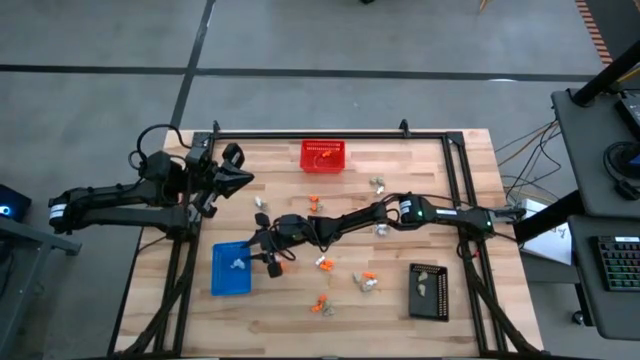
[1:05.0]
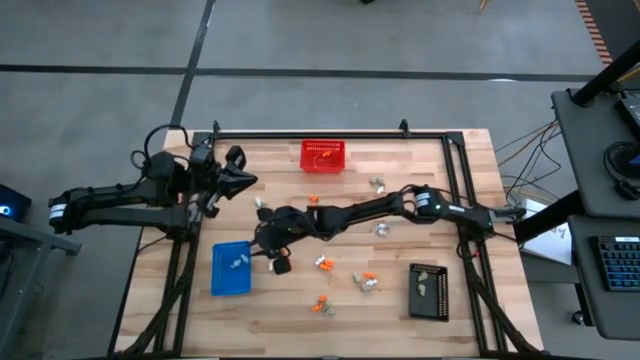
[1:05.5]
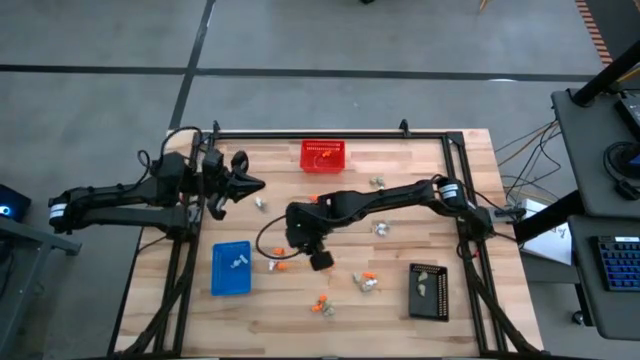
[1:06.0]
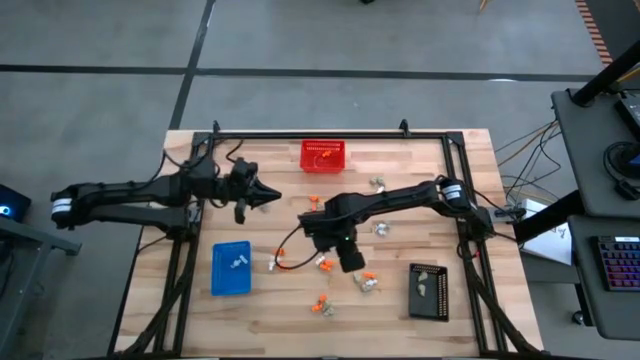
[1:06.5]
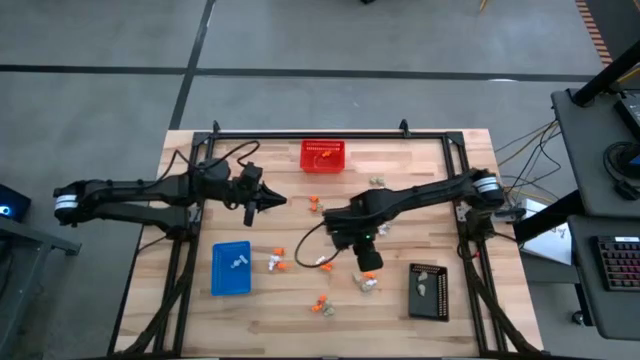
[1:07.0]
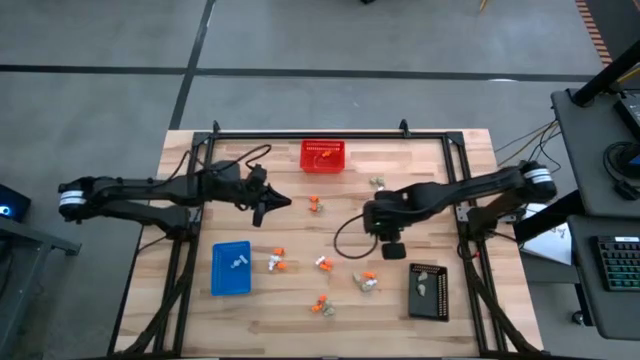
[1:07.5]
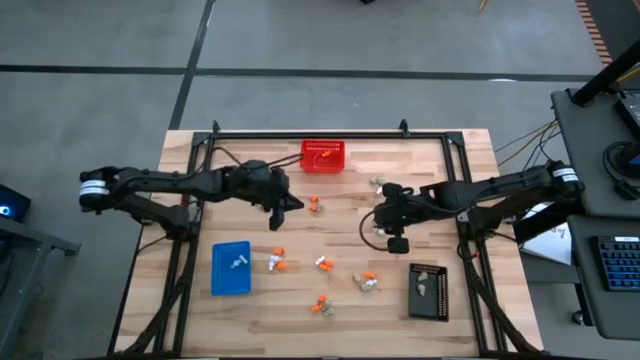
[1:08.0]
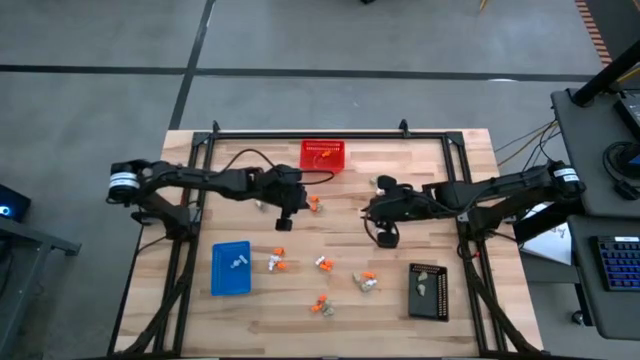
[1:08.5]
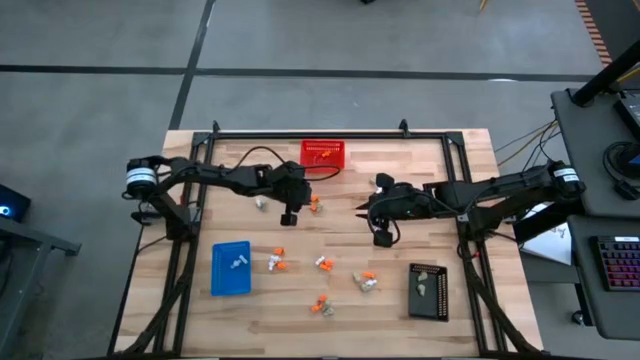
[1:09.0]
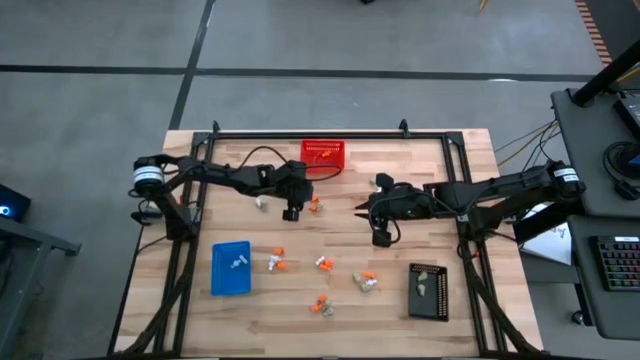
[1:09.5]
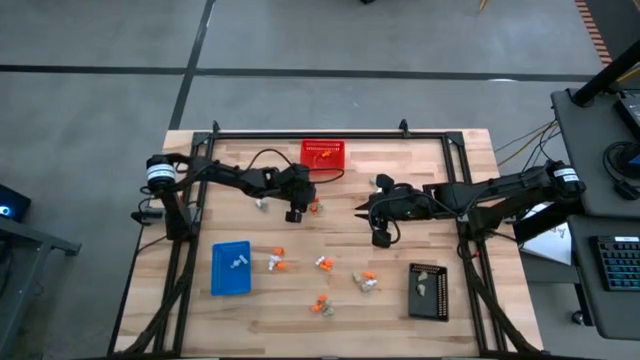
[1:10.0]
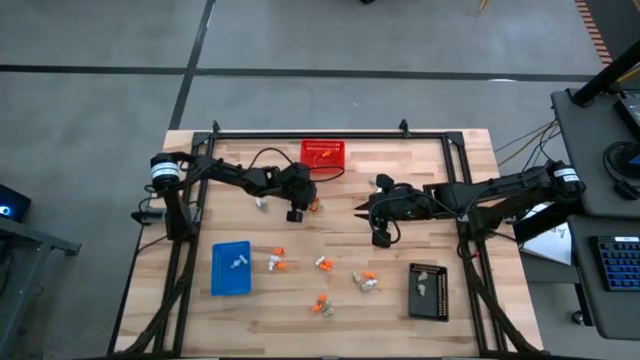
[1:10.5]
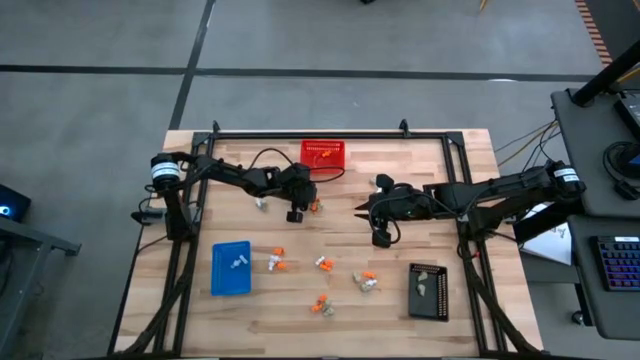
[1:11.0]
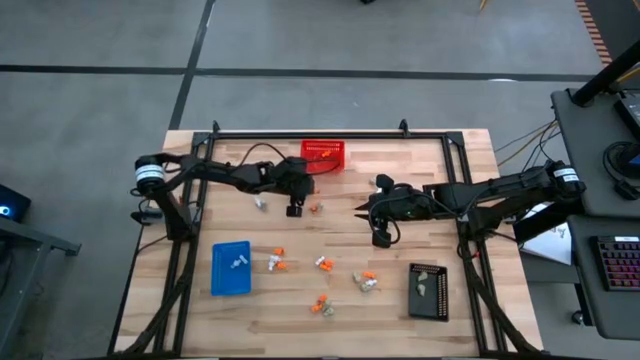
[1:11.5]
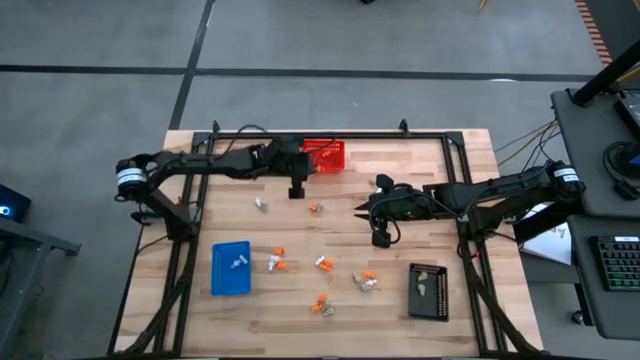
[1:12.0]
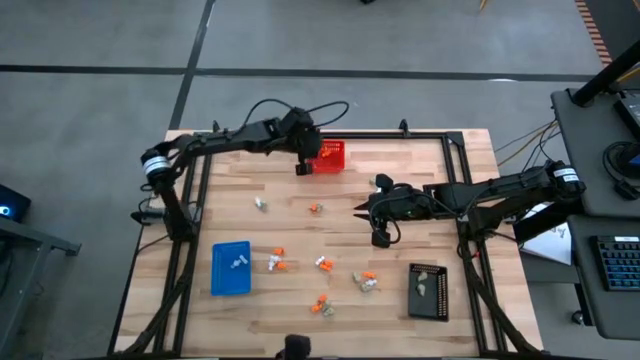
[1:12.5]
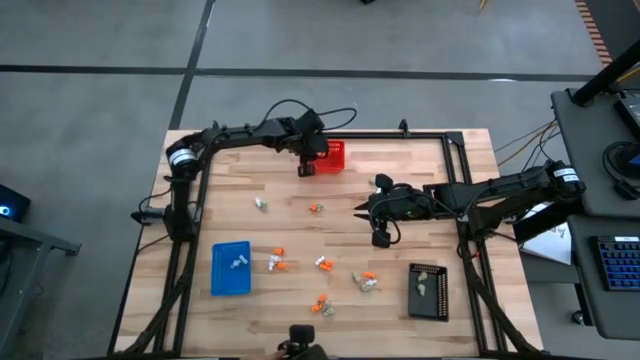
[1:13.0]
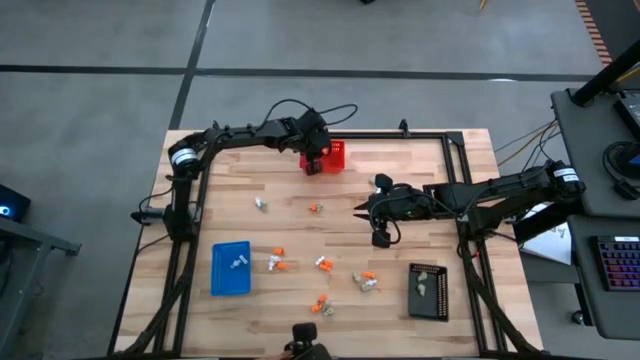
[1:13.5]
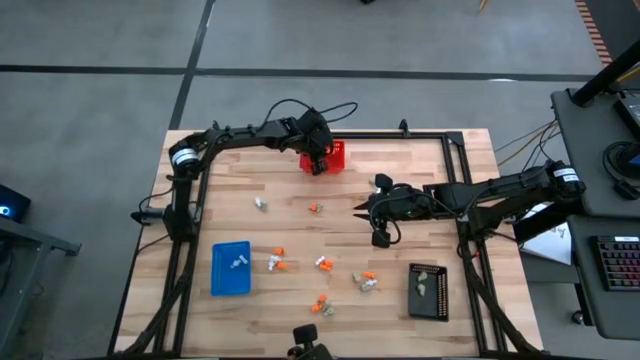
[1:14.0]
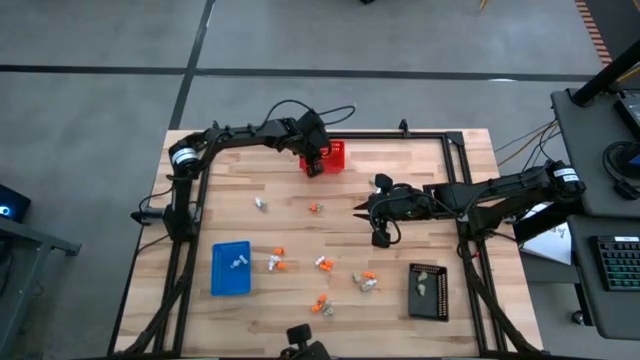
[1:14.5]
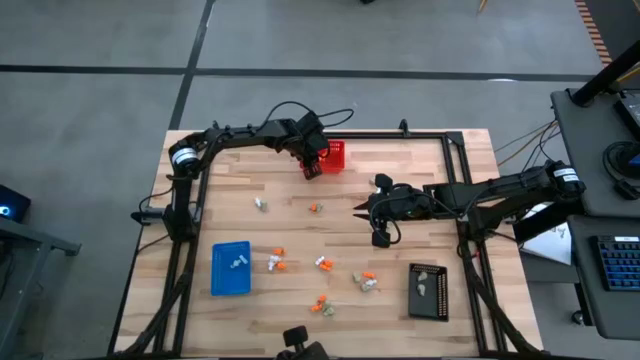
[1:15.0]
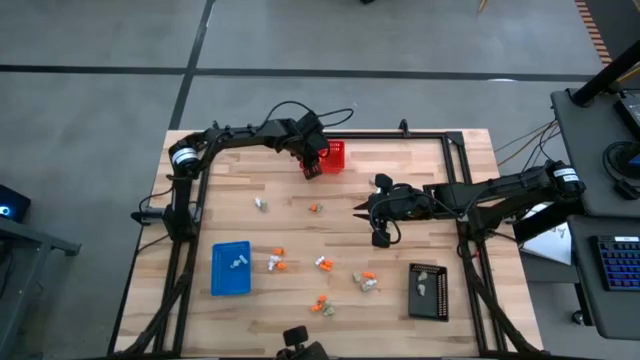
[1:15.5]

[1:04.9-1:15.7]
Task: Sort Halloween decoration
Put the orange skeleton toy into the red bin

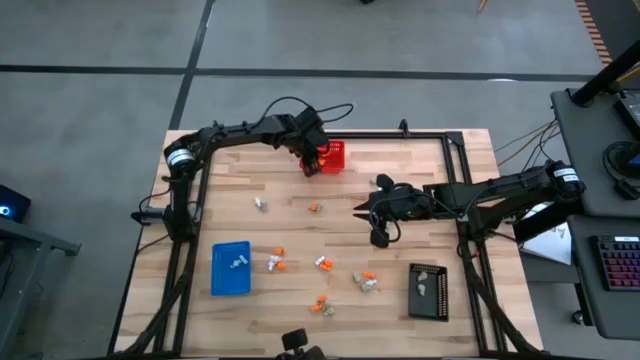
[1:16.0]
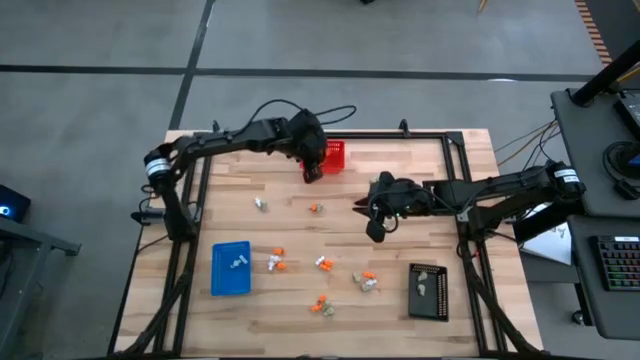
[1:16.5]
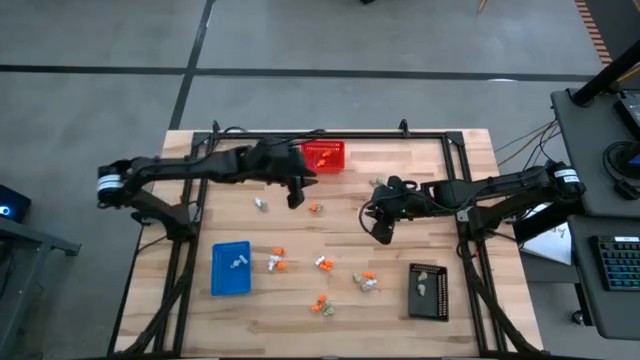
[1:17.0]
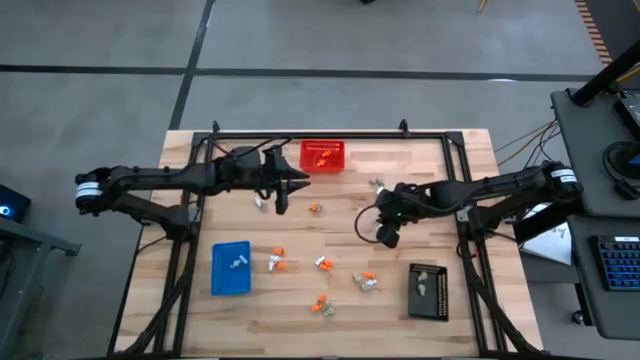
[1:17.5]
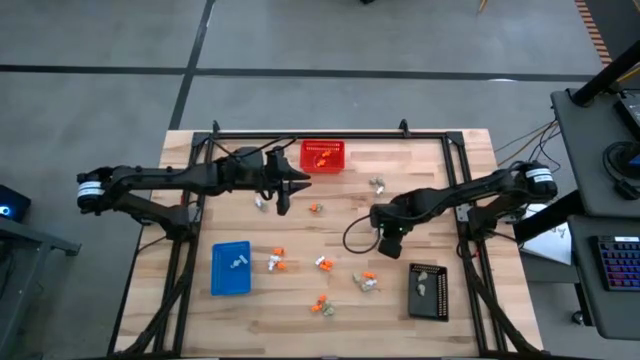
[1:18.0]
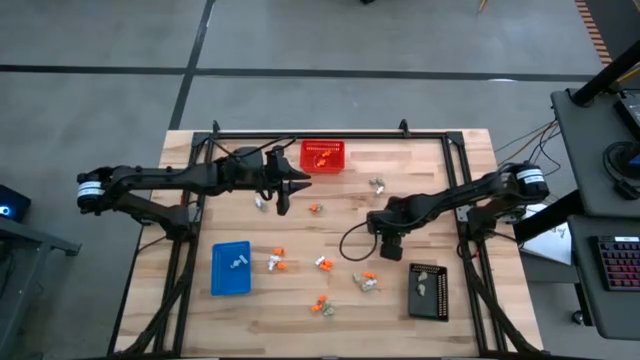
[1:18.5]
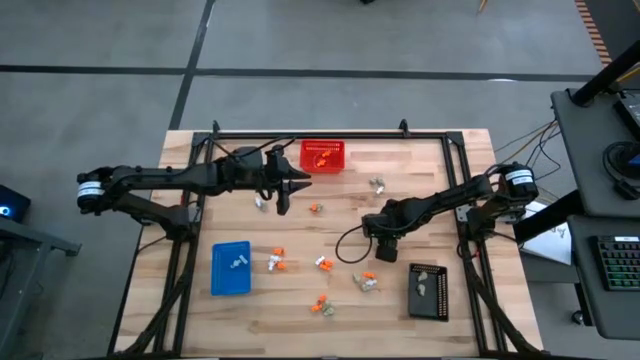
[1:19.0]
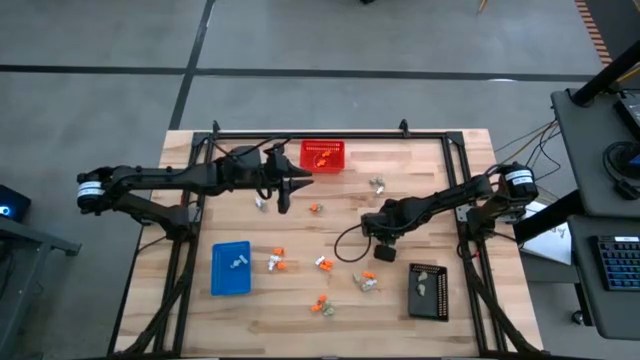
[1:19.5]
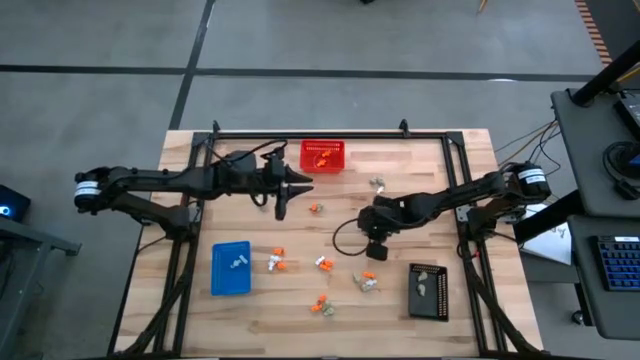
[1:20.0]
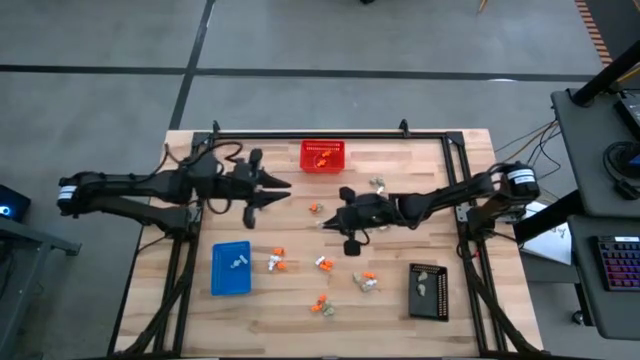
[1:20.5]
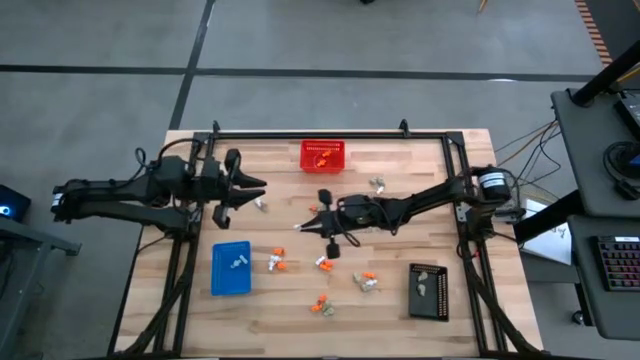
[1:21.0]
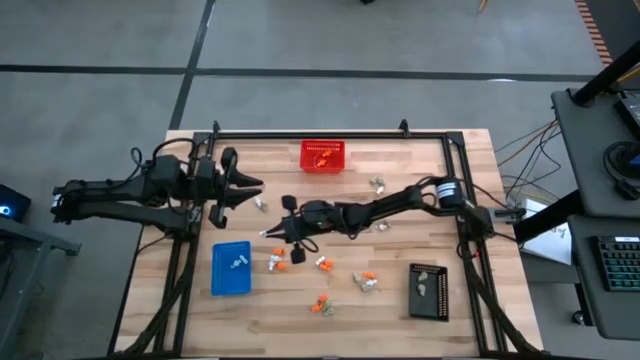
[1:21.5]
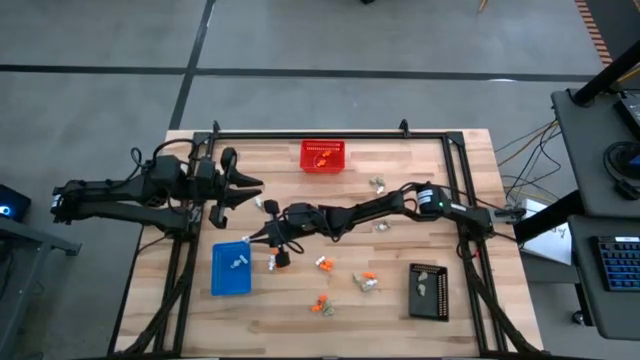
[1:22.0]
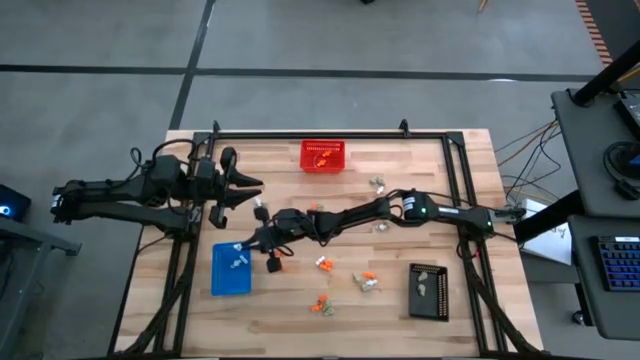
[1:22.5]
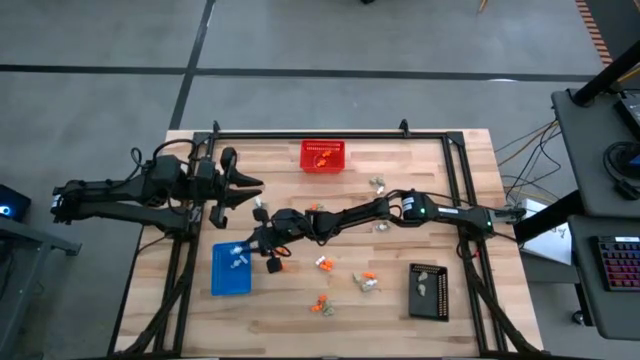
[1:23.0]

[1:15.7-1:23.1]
Put the white skeleton toy into the blue bin

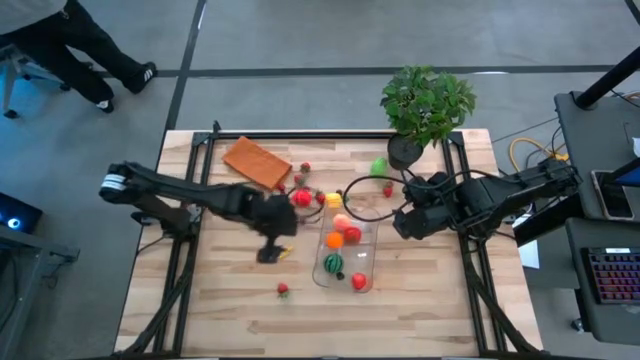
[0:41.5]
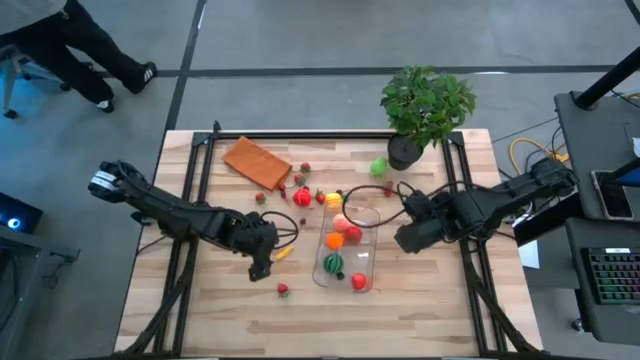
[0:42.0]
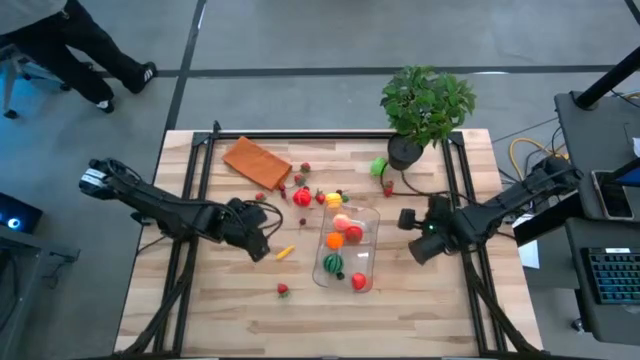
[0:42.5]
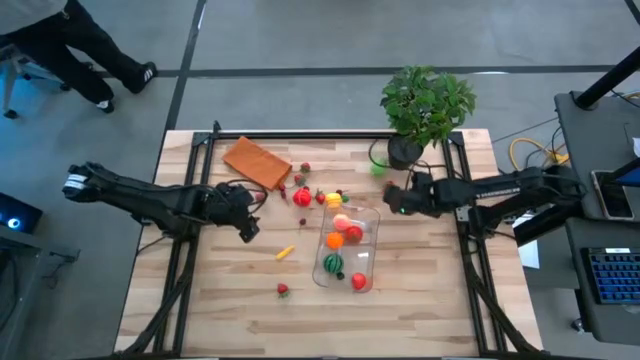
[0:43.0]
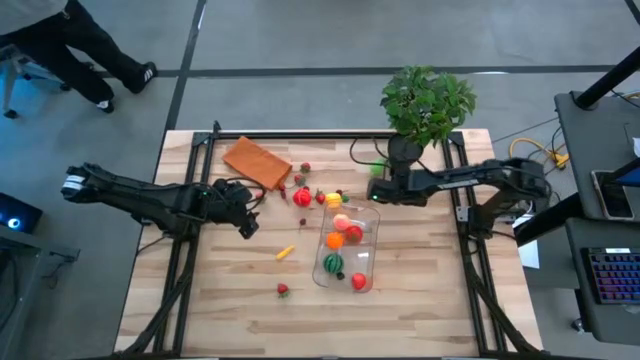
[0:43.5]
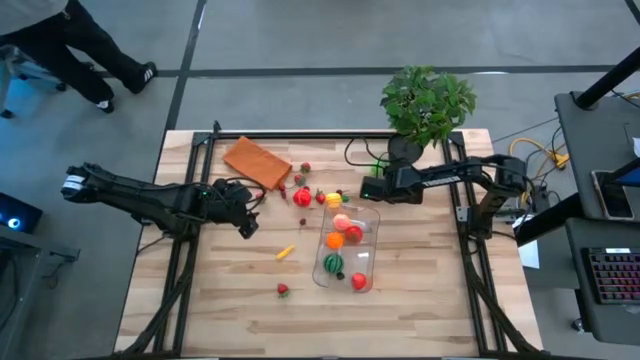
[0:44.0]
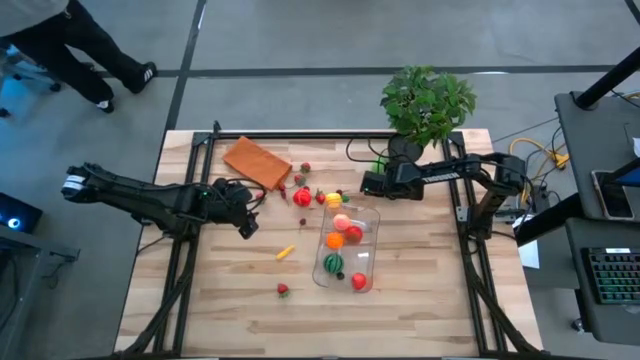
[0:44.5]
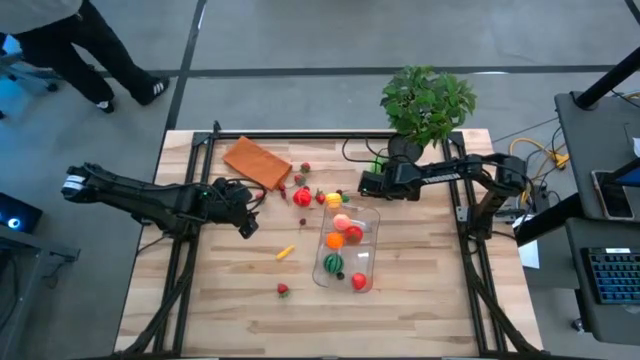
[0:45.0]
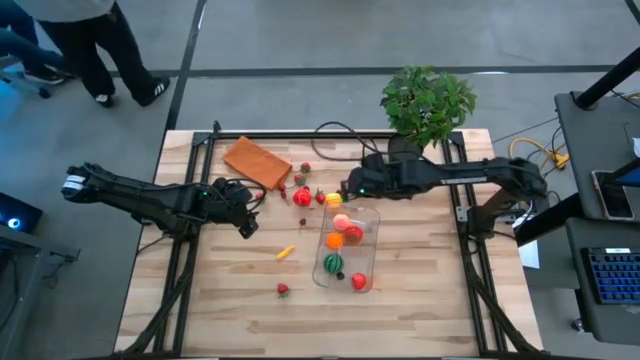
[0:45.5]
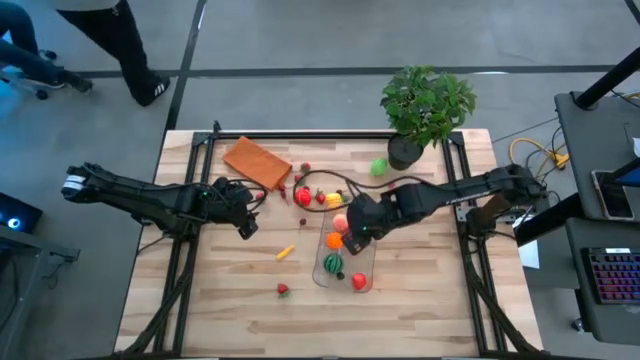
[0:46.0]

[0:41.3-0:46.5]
Task: Pick and placing Produce into tupperware
Put the strawberry into the transparent bin
